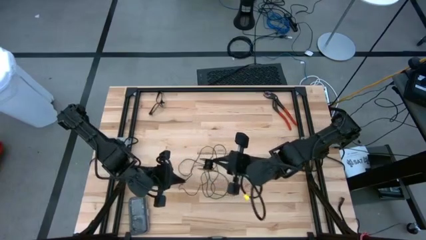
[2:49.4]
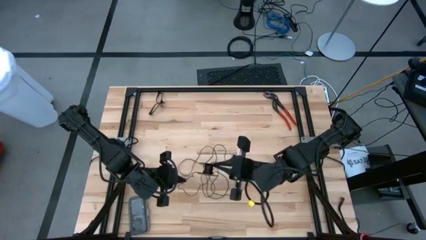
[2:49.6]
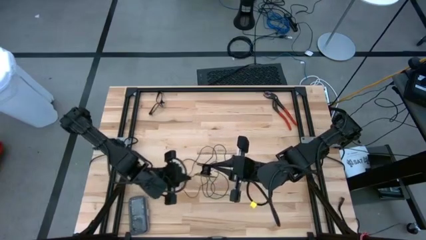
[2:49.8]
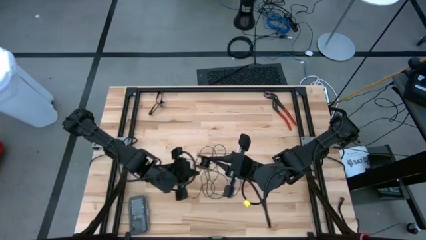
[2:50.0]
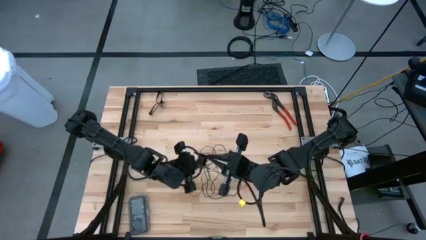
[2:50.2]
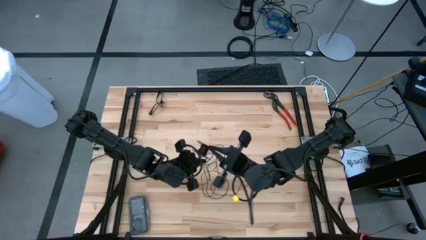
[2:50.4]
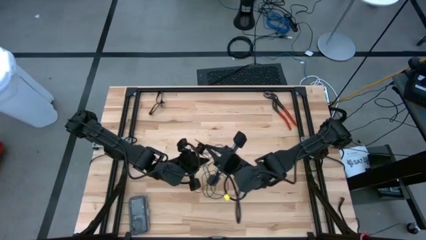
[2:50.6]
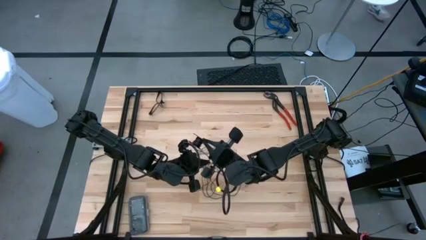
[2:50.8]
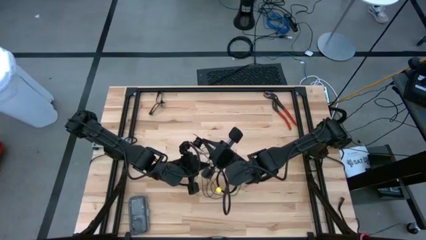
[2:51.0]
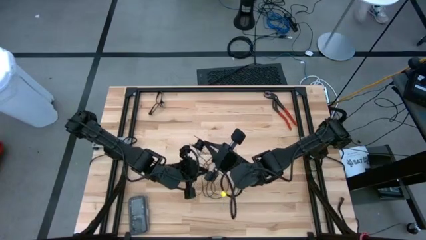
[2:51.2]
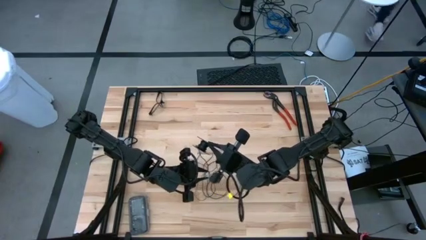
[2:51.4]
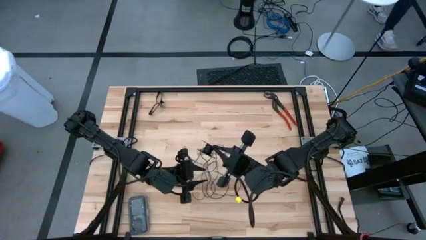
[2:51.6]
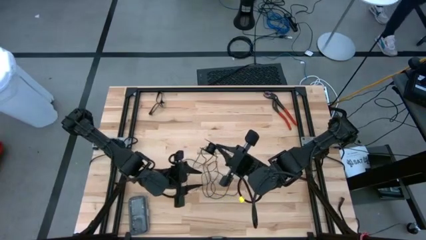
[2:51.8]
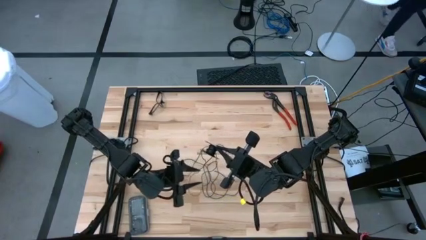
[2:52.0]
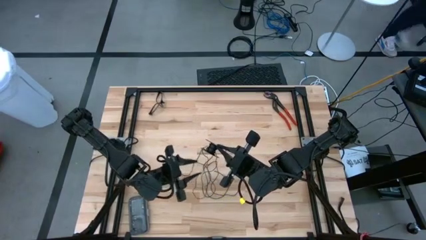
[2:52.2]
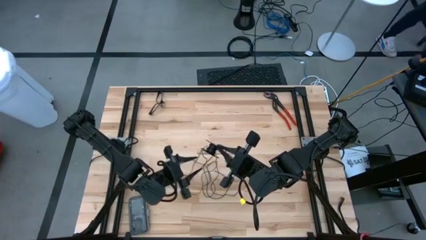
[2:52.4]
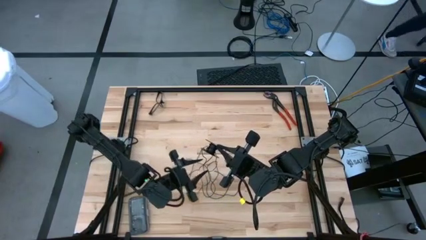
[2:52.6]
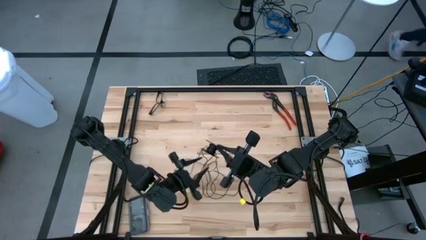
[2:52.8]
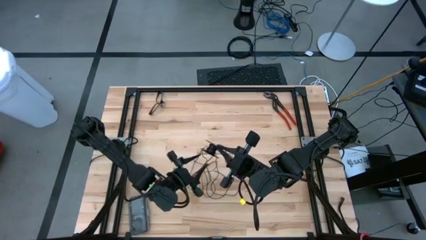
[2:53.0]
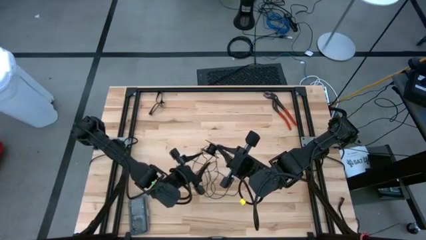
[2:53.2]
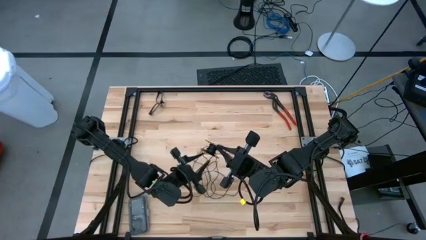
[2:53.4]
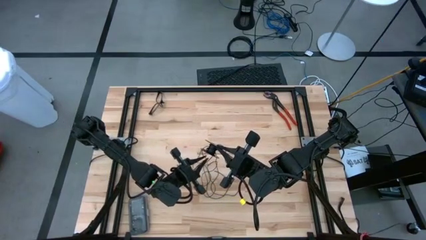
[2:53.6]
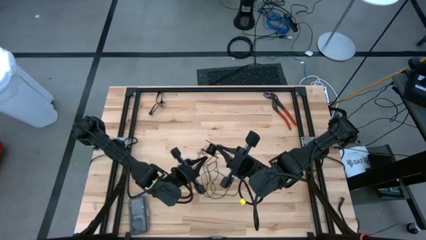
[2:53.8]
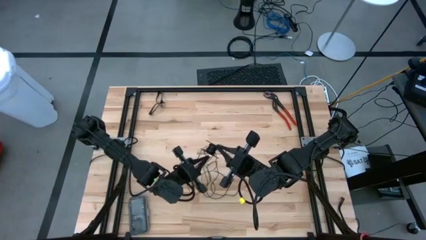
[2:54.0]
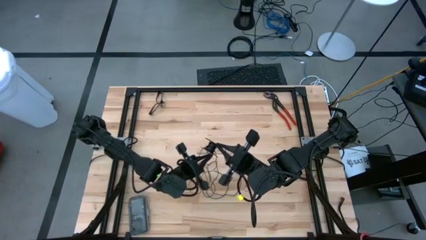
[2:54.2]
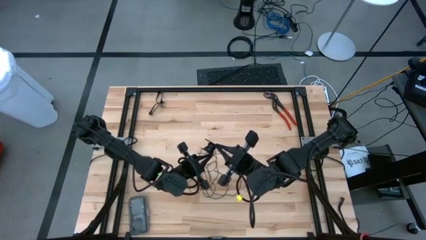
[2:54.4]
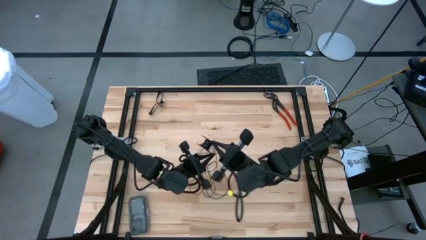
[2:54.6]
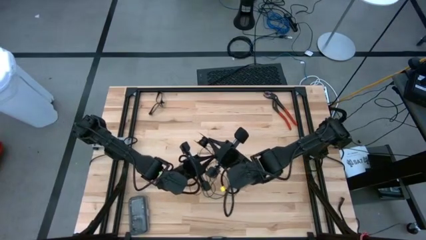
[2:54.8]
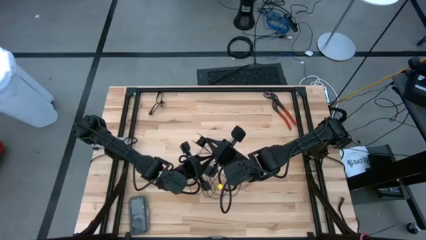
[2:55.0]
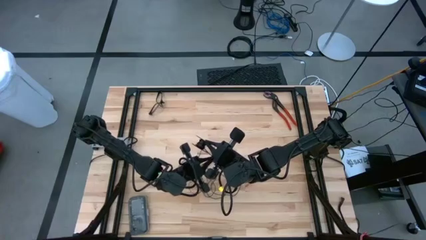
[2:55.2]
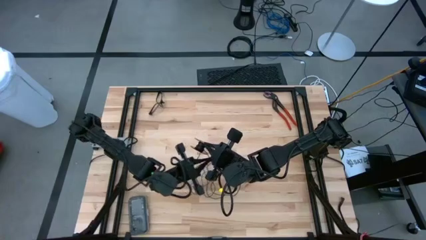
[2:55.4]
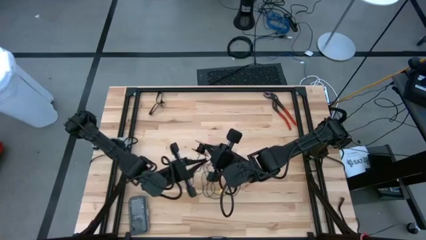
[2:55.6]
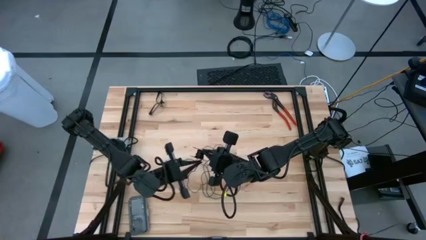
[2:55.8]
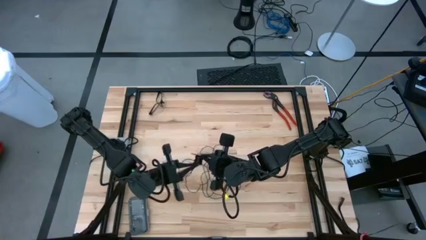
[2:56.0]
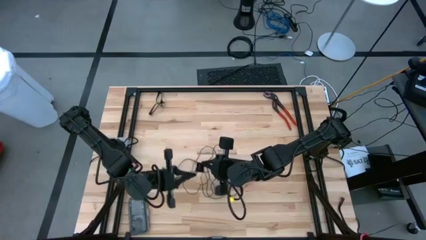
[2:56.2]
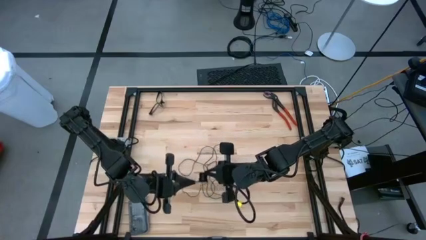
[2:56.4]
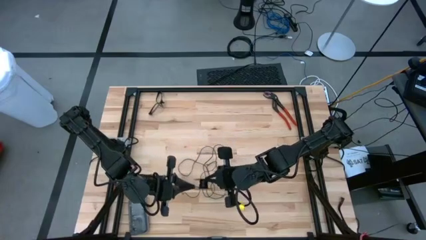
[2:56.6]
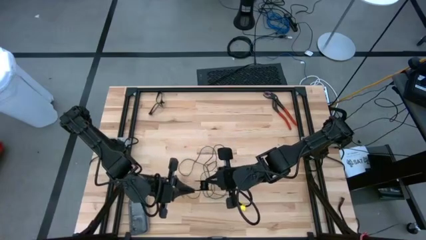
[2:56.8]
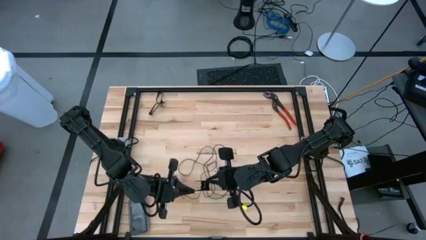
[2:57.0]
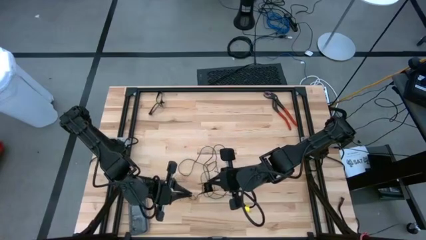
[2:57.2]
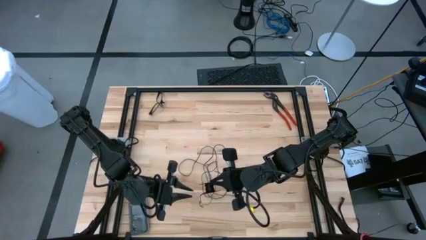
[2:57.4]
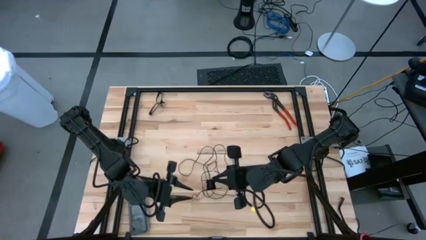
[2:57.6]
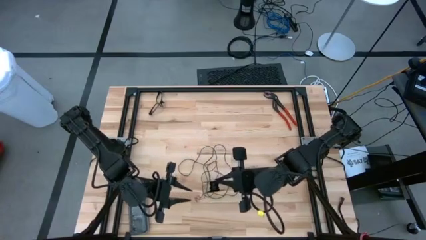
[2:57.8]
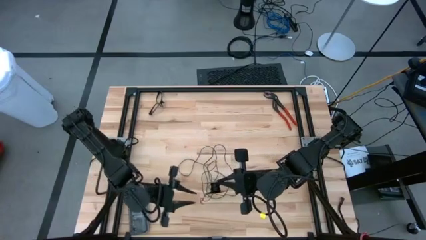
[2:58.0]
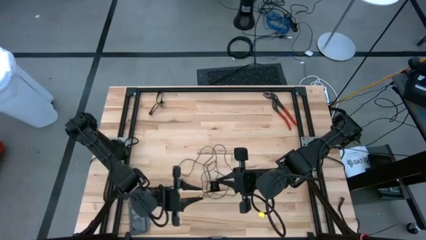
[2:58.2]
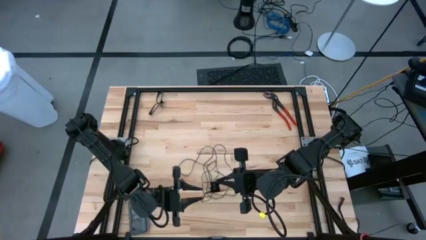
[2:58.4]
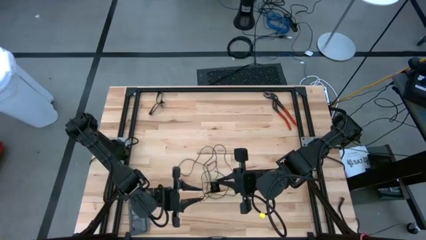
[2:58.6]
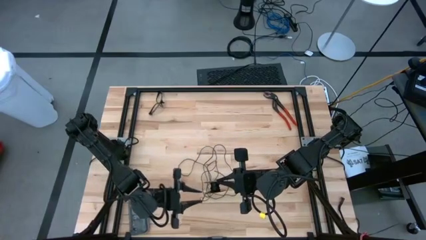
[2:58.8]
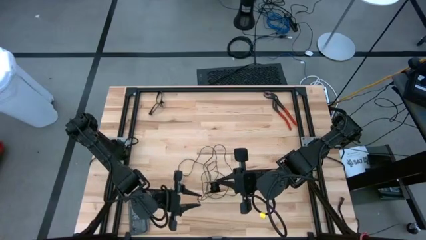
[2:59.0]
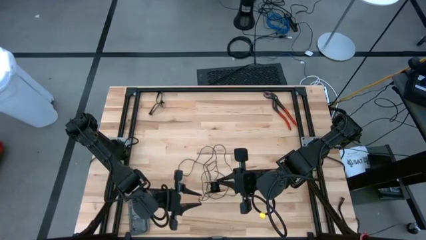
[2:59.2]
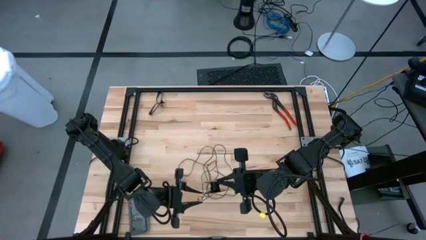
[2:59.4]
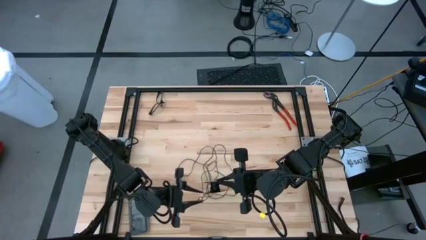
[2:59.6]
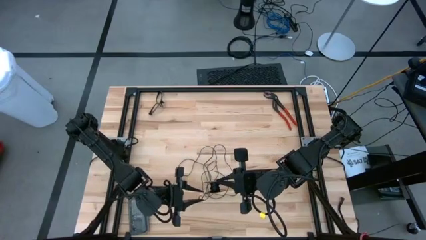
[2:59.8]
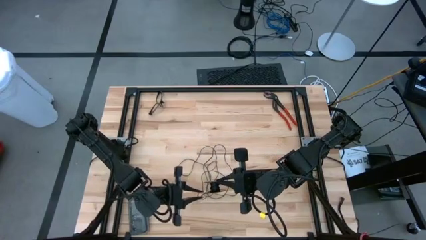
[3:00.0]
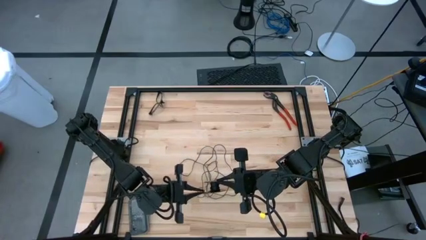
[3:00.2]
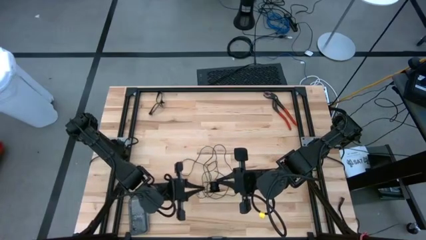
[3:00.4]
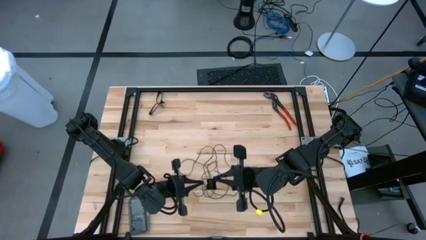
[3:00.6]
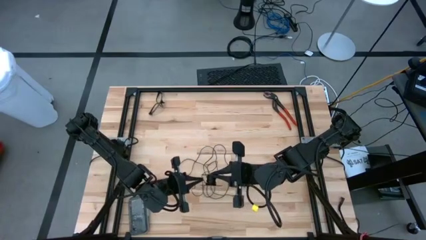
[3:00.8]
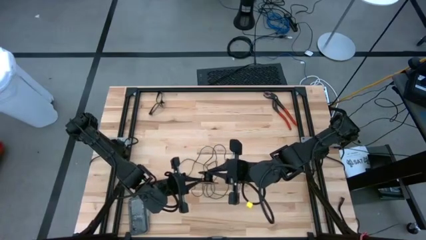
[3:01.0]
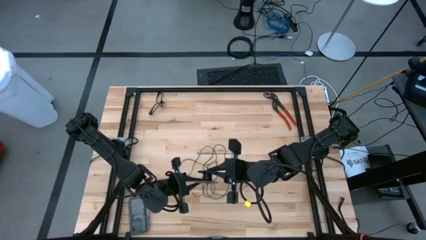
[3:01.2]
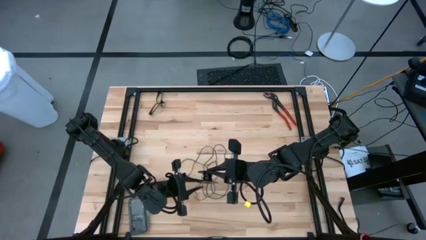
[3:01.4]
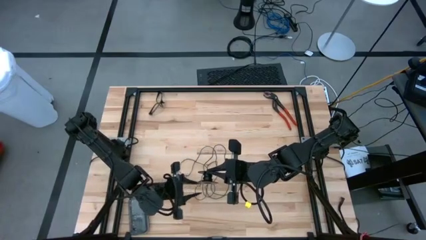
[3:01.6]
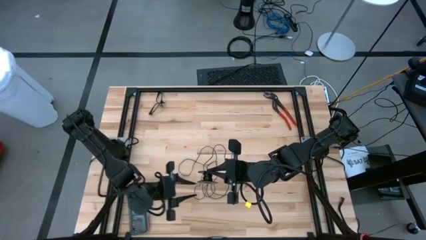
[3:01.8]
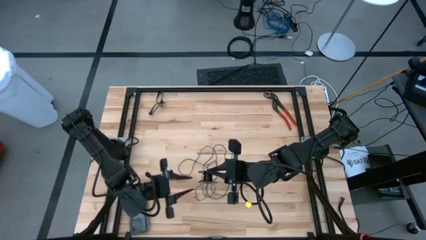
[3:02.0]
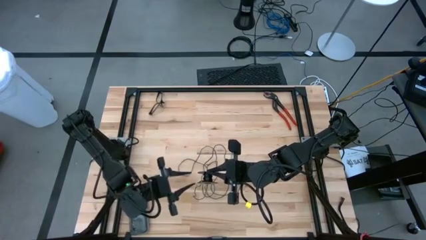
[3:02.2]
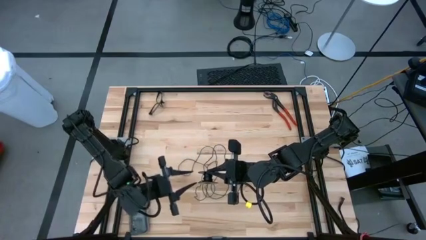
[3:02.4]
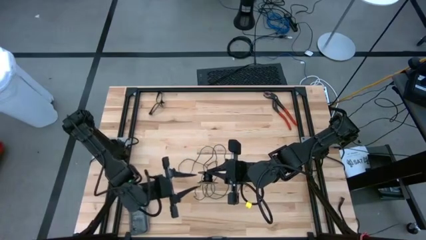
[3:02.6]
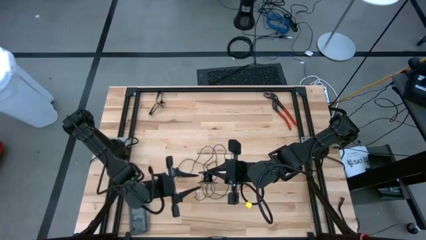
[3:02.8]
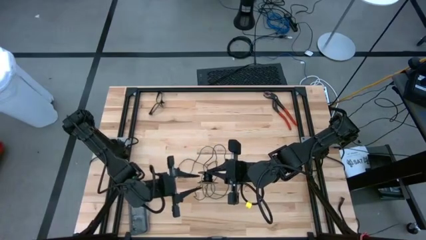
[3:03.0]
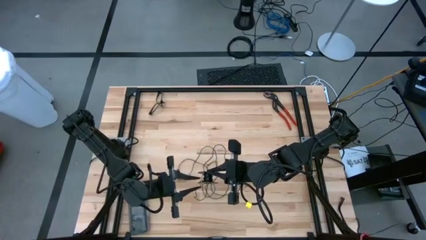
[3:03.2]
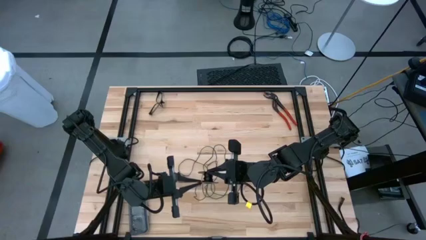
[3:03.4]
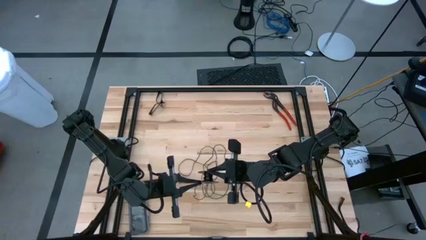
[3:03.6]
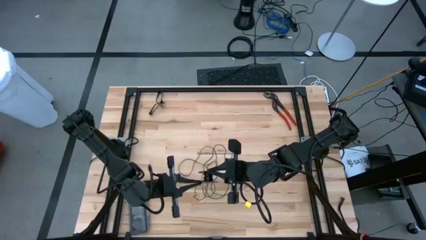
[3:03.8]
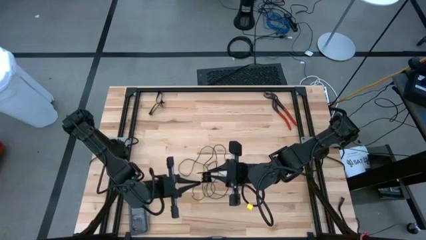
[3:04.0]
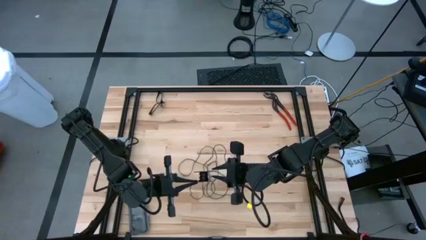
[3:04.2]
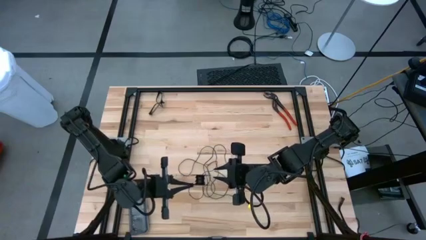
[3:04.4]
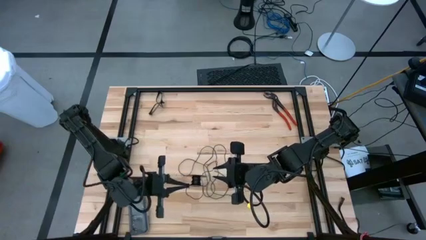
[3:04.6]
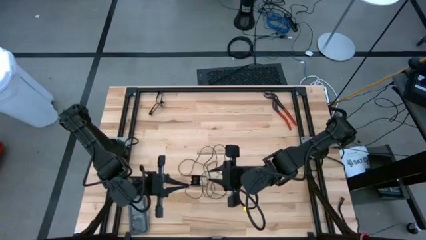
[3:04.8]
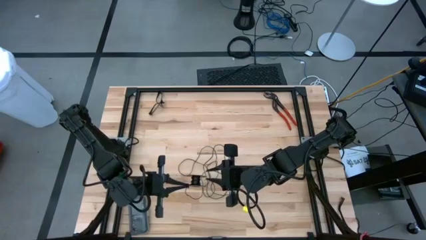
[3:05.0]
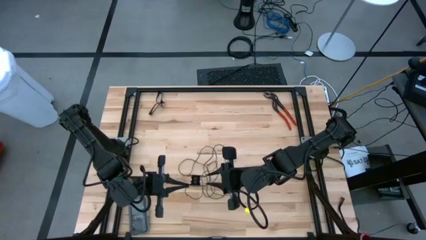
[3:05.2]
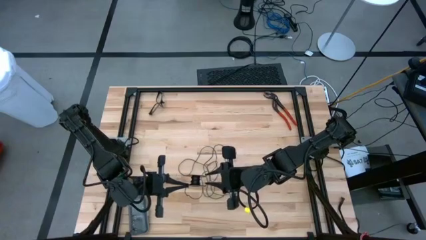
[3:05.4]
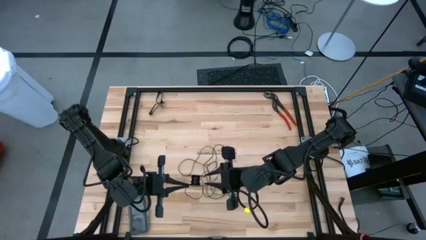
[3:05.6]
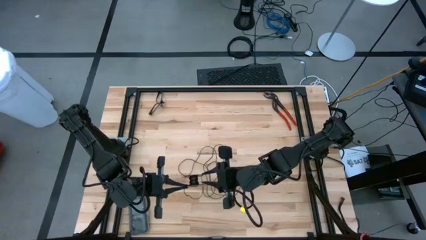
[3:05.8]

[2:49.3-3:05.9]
Task: Coil cords
Coil the black wire onto the spool

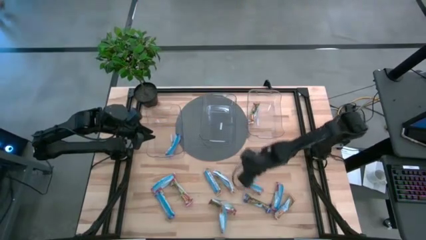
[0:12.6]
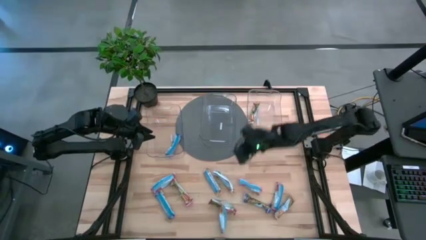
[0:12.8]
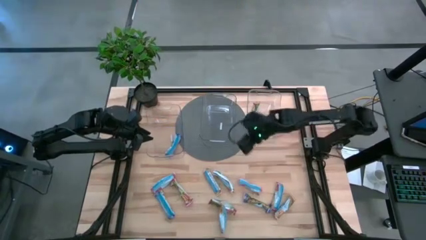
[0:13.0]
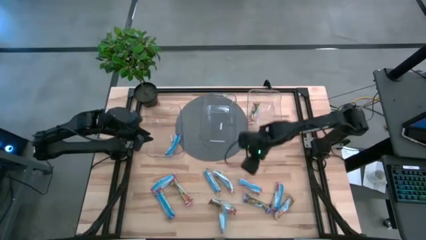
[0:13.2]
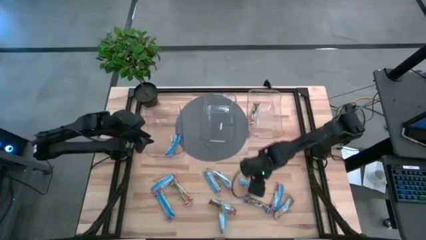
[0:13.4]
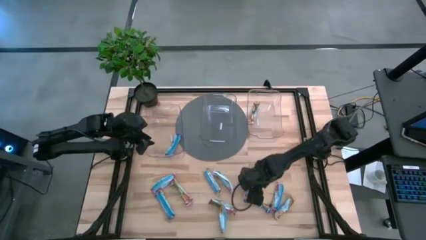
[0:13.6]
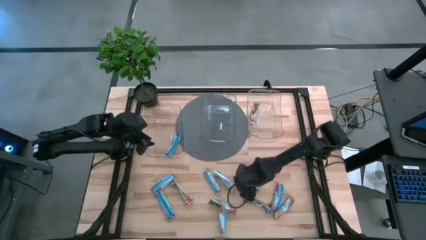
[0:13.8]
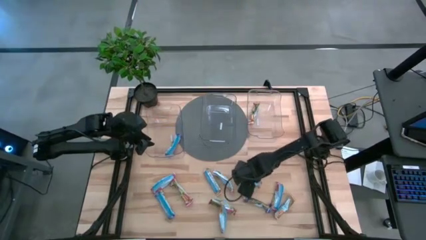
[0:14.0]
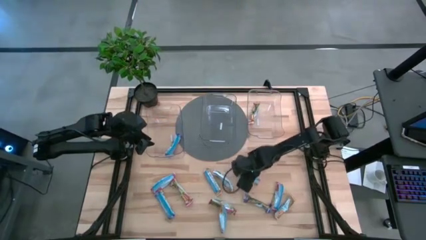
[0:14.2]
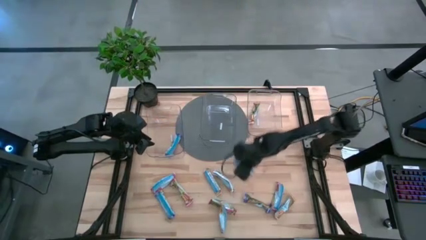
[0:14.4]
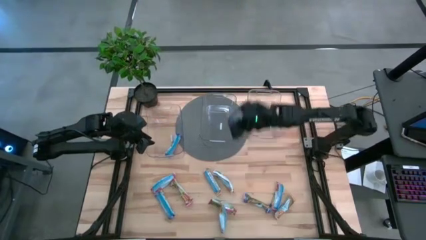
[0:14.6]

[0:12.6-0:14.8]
Task: Pick and place Granola Bars by type
Put the red granola bar into the middle transparent bin
